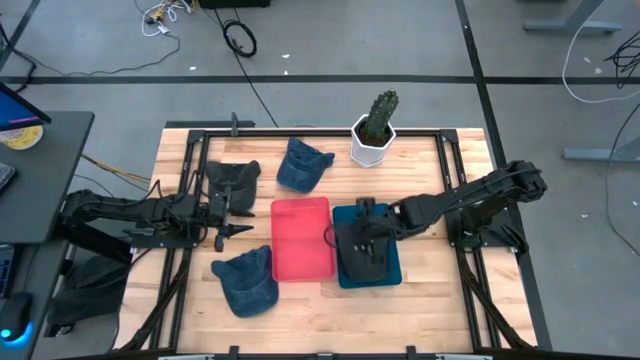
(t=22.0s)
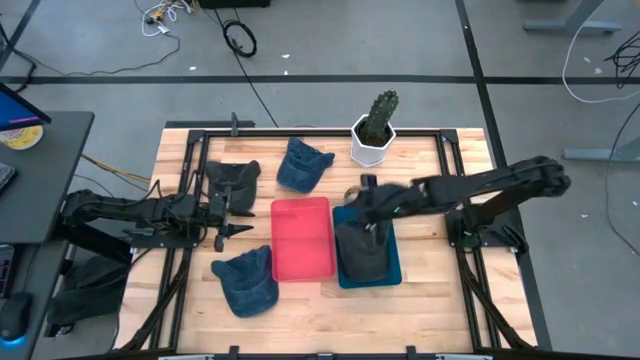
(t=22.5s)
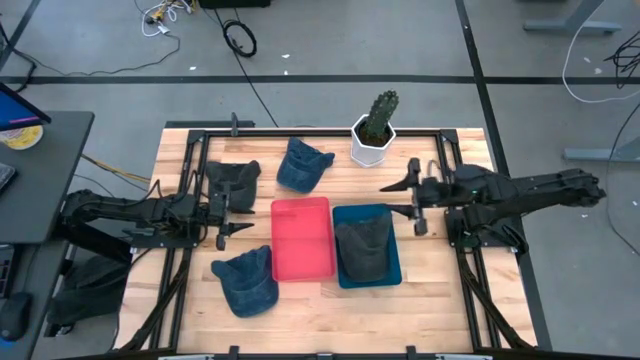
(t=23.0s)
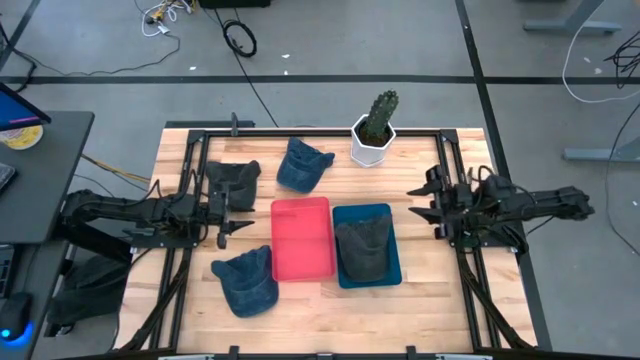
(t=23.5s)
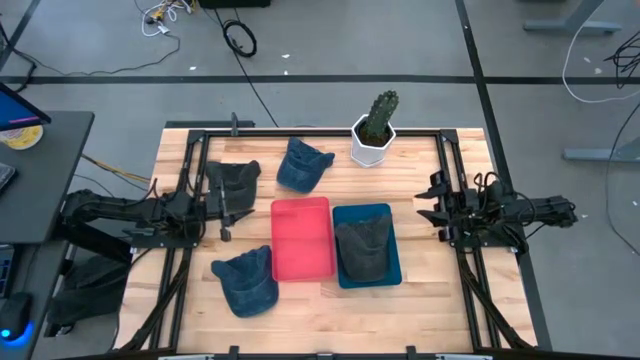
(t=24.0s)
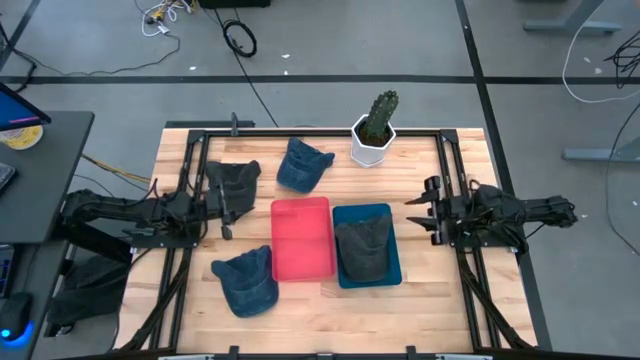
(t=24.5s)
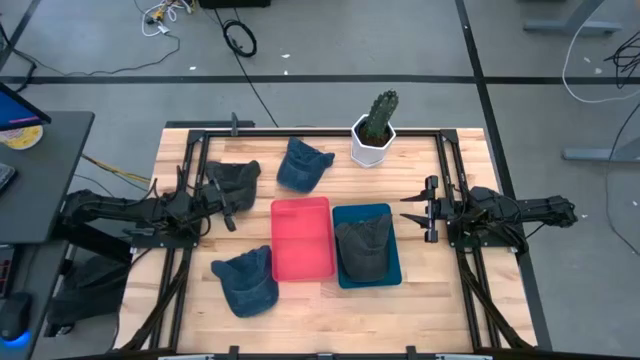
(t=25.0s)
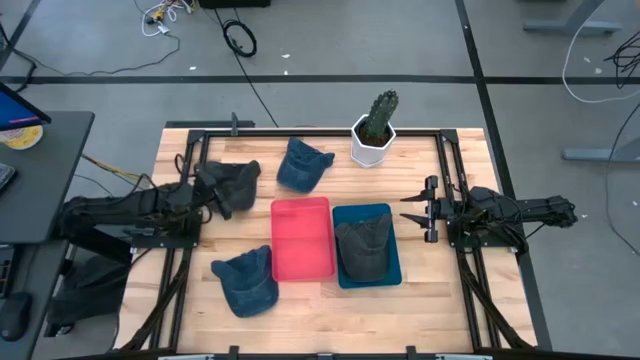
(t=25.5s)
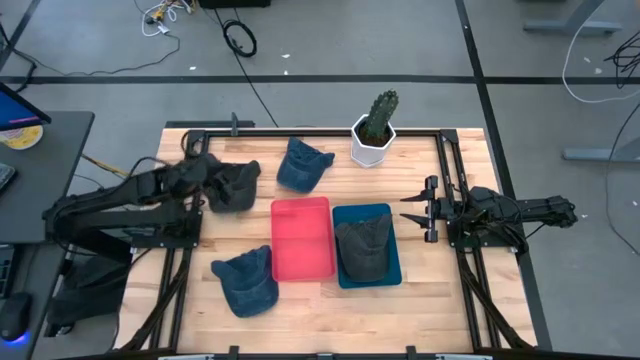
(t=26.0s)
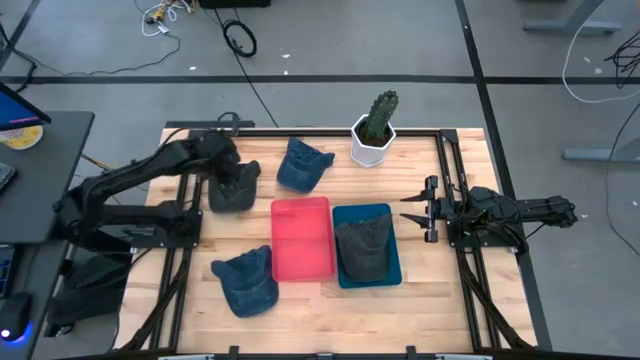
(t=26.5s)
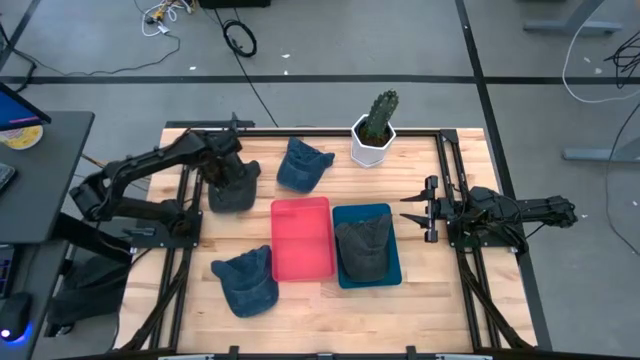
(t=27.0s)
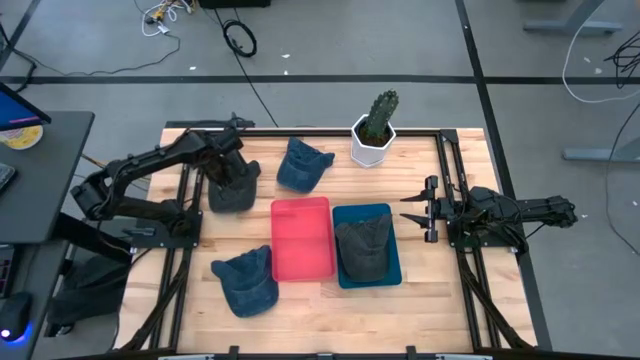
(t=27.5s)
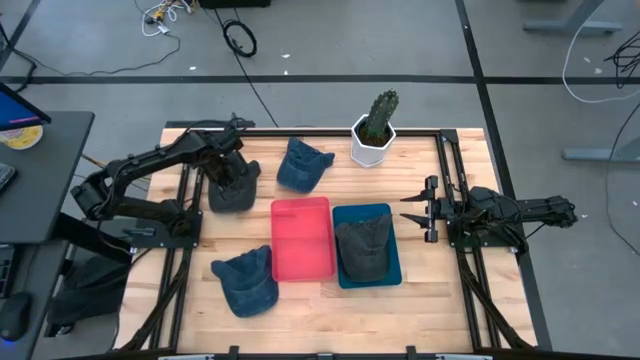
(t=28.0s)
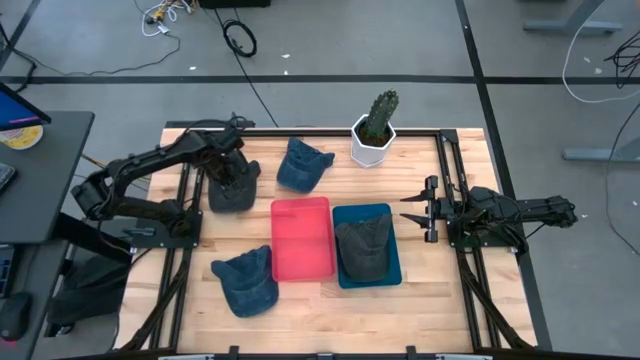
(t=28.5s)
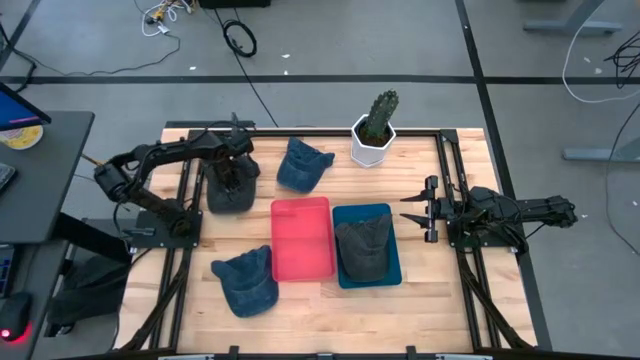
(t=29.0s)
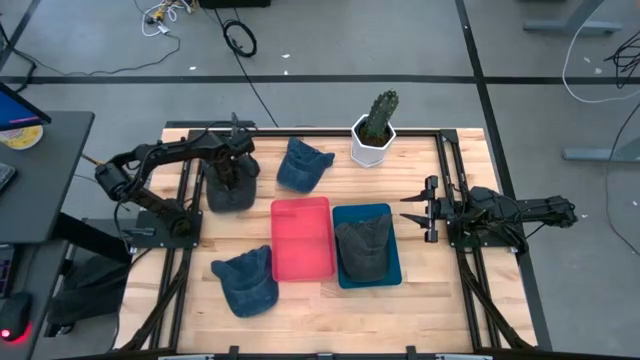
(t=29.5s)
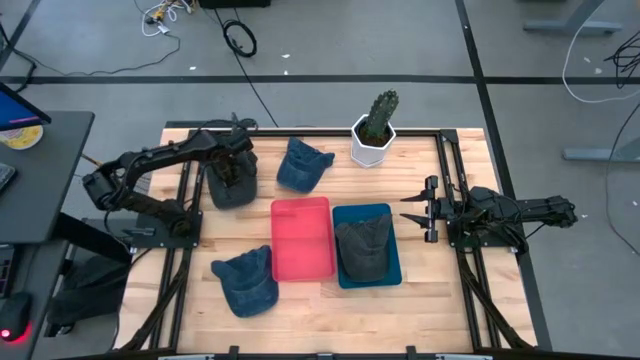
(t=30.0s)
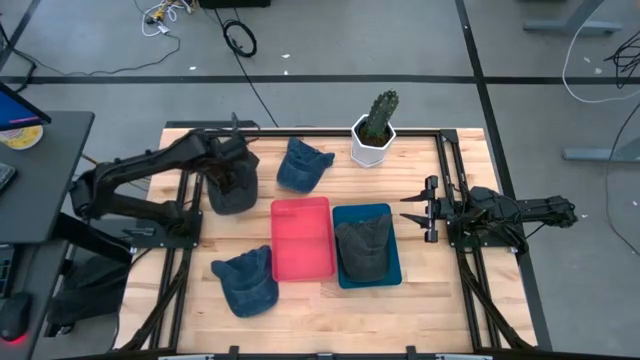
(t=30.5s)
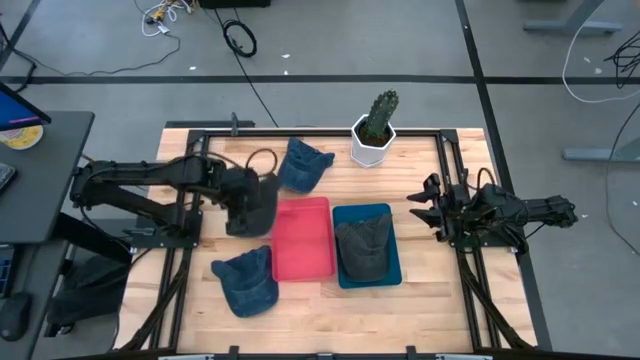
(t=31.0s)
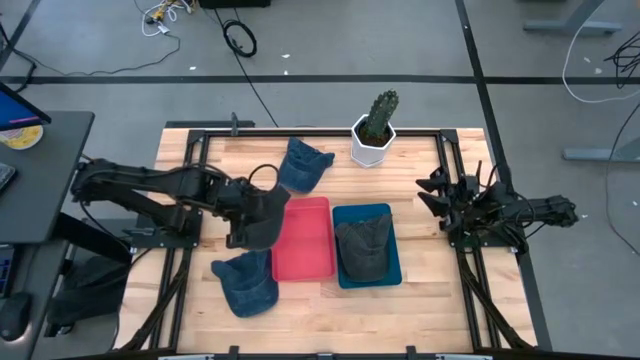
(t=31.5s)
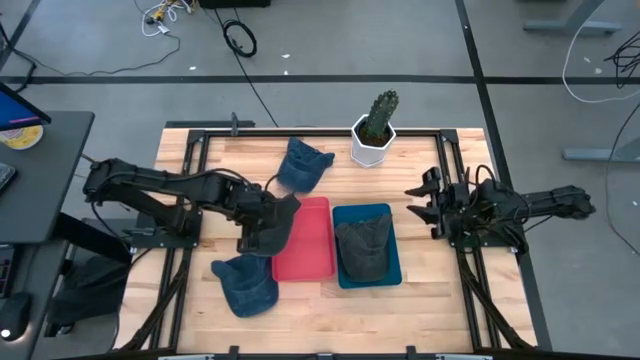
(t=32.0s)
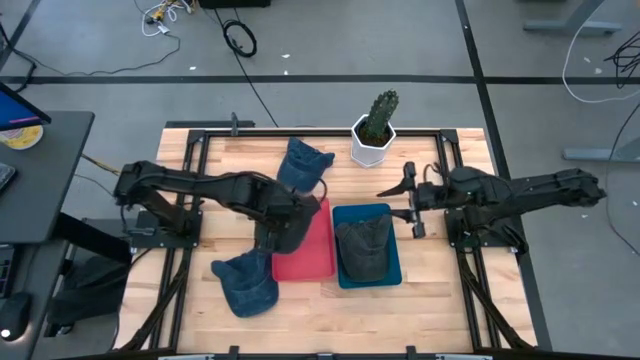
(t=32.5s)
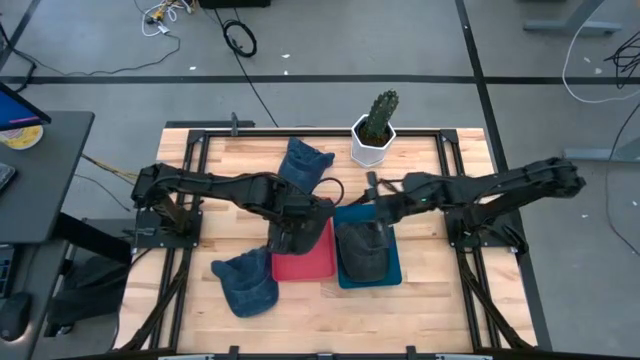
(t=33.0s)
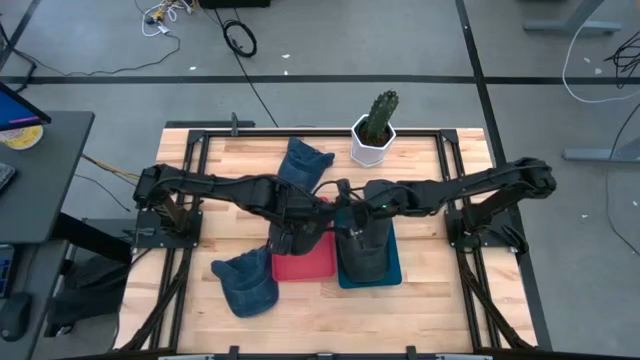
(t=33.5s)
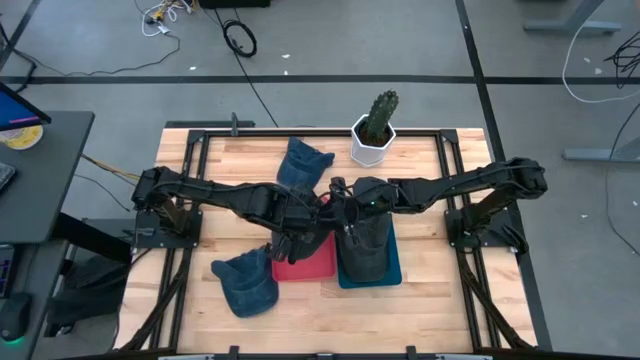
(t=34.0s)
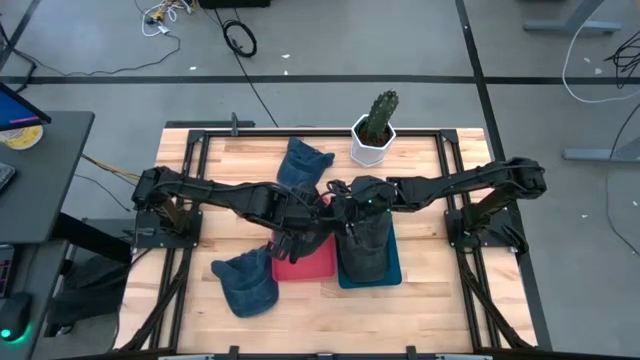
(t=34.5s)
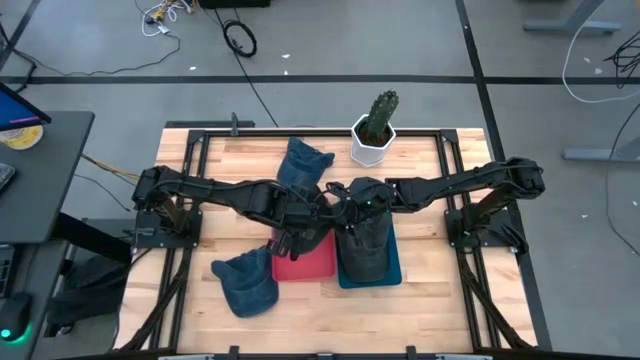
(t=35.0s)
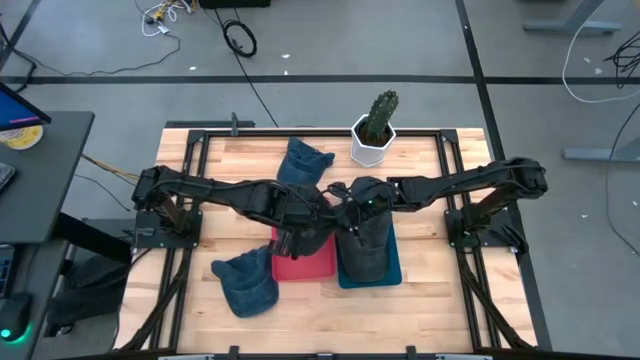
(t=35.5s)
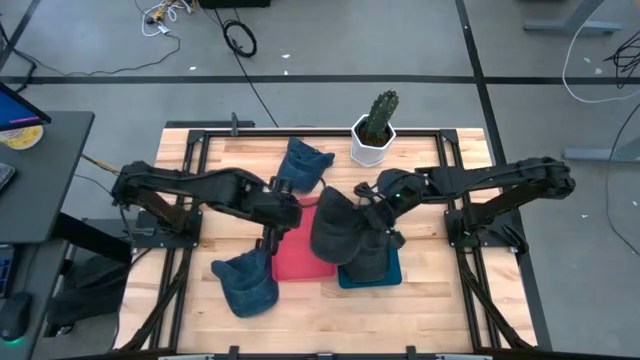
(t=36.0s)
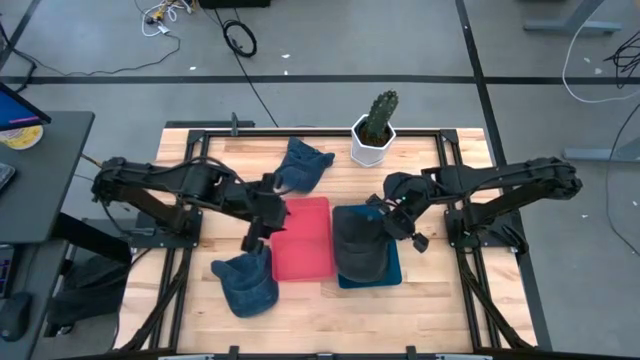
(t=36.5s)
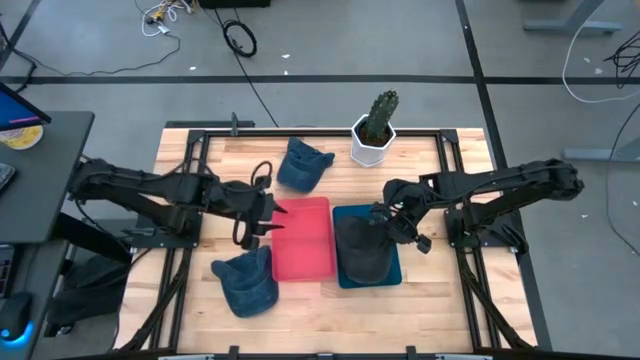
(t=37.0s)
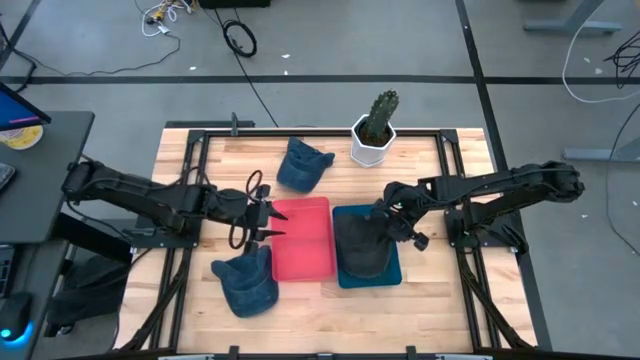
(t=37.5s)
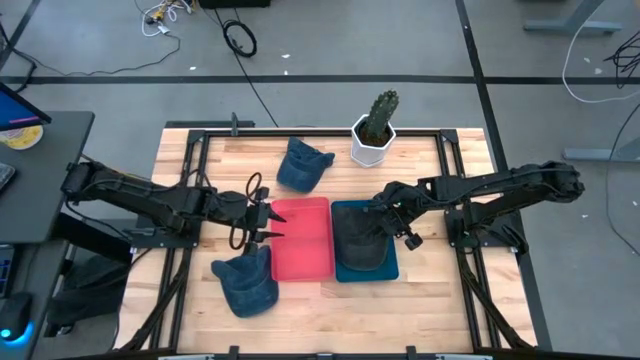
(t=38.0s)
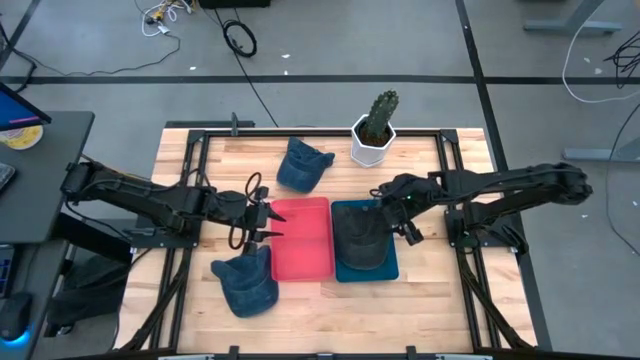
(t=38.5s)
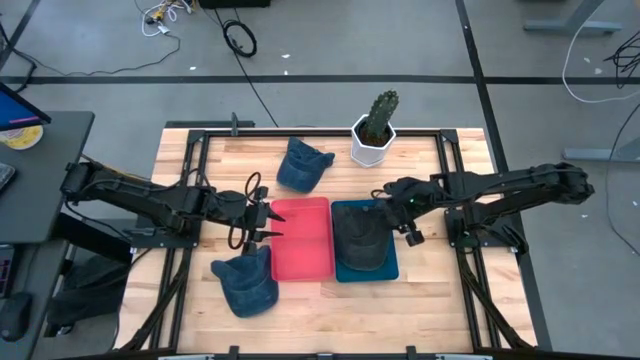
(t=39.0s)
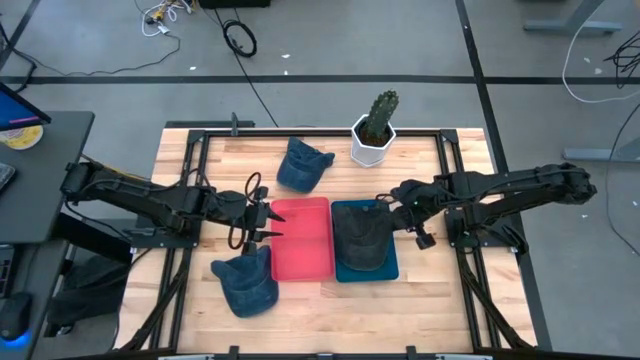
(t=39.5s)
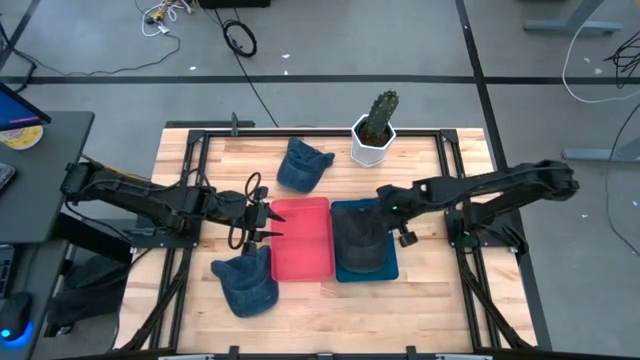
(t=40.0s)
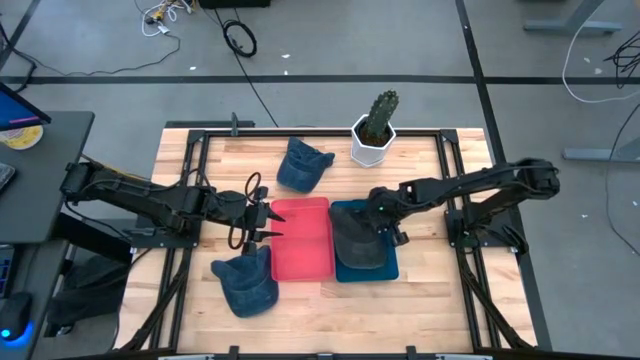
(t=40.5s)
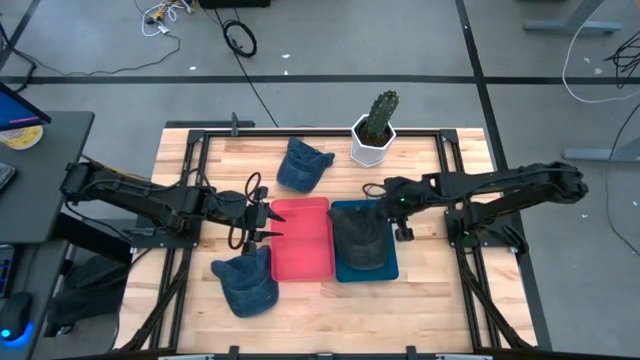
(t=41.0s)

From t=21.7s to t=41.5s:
Task: Pick & Place hat
Put the black cap into the blue bin

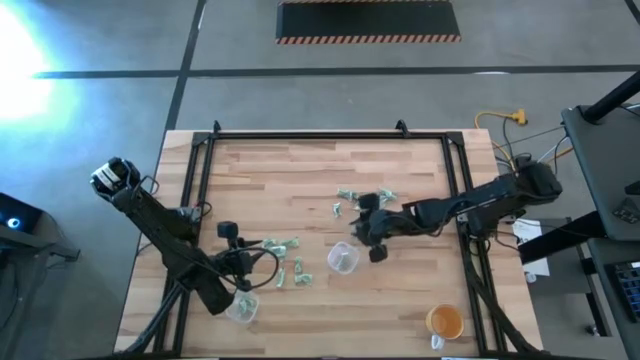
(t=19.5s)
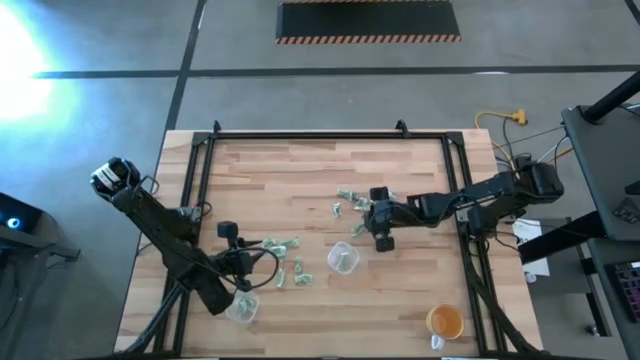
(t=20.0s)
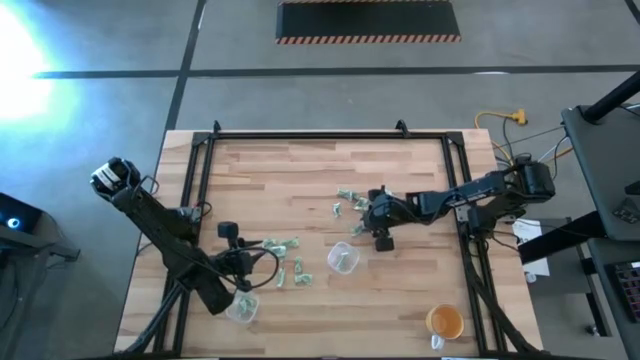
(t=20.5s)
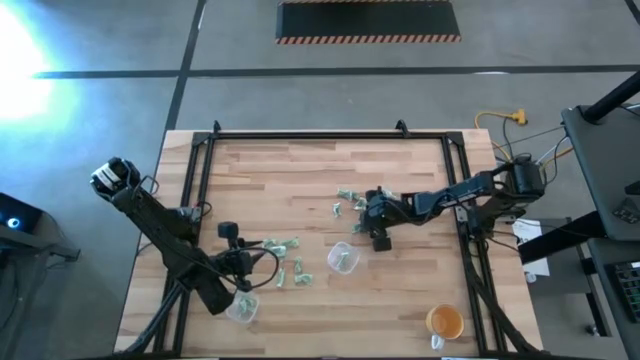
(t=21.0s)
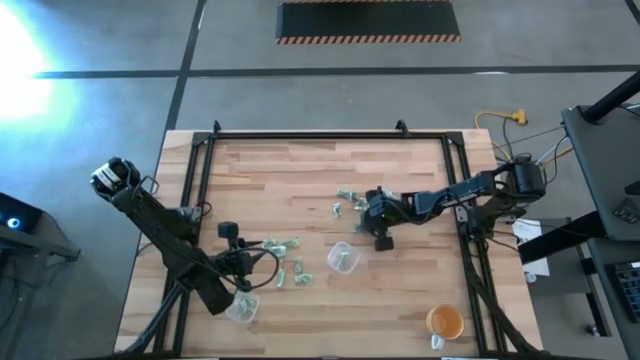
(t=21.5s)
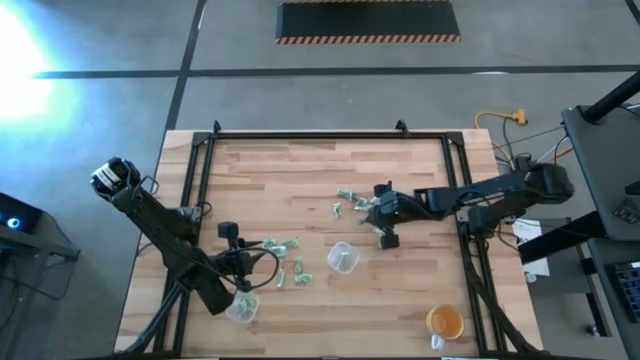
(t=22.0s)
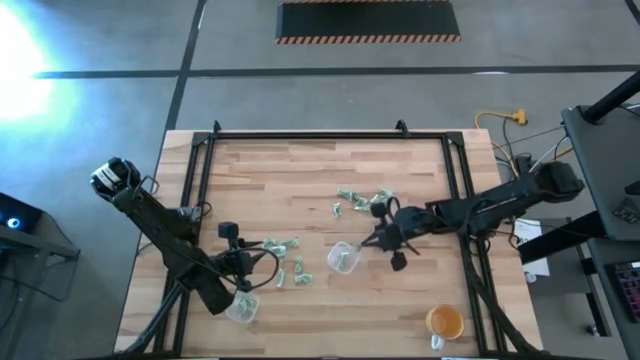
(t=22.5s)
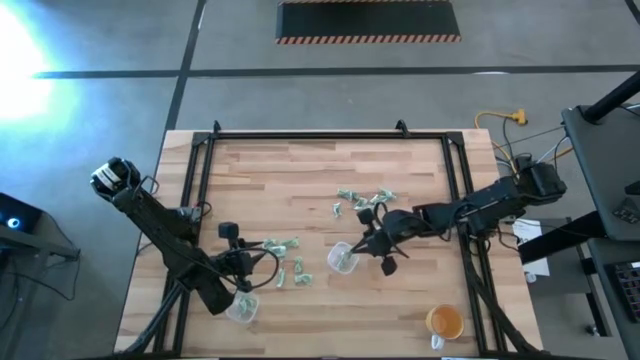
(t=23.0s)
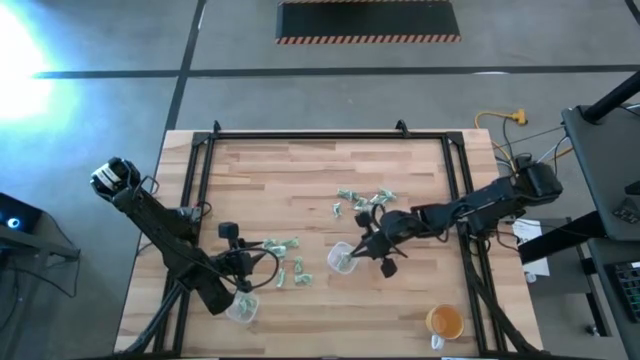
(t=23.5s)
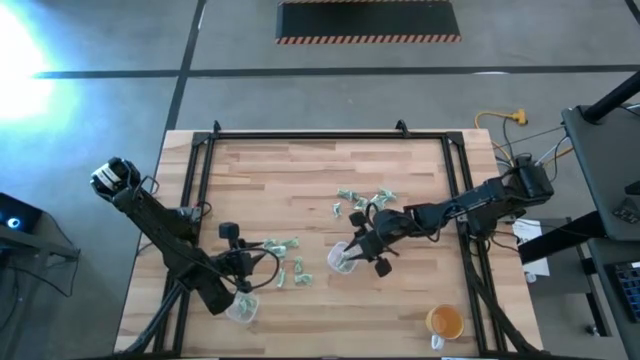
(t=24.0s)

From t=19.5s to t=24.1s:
Task: Pick and place items into bin
Put the light green packet into the top transparent bin
